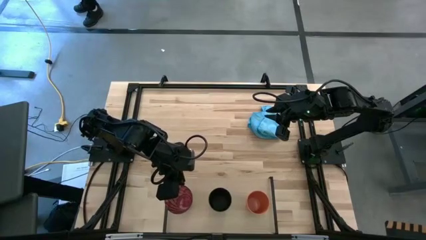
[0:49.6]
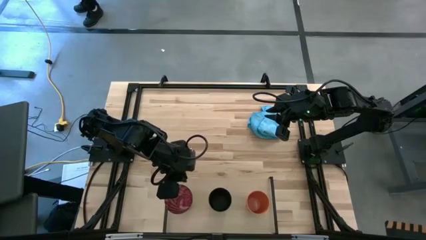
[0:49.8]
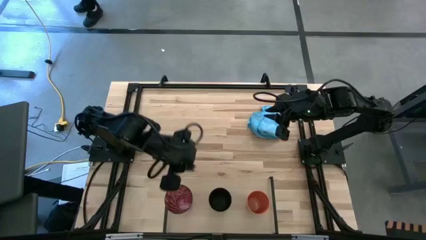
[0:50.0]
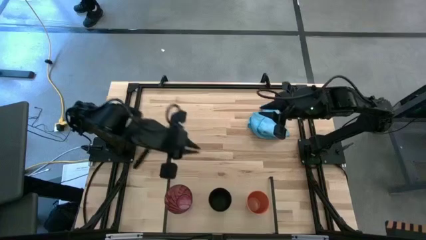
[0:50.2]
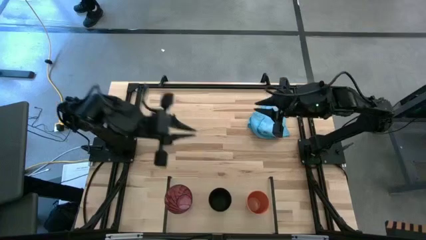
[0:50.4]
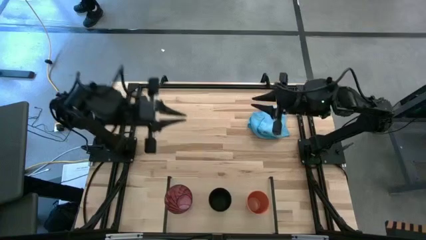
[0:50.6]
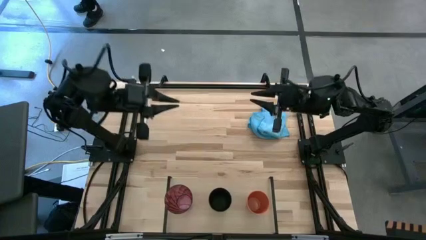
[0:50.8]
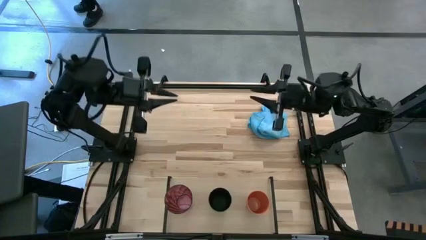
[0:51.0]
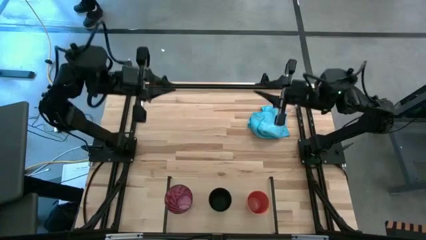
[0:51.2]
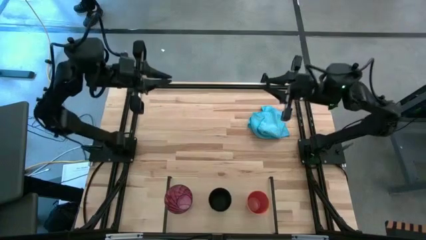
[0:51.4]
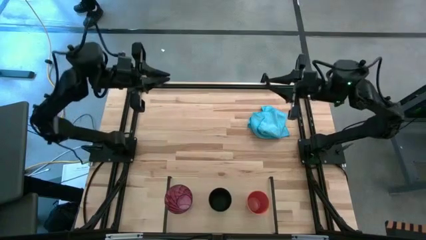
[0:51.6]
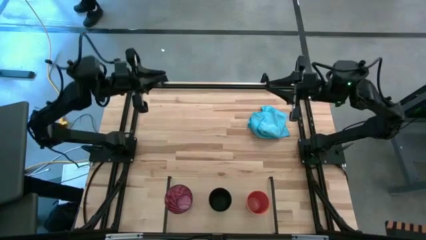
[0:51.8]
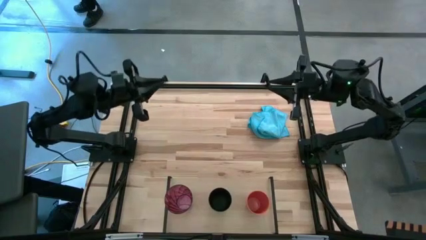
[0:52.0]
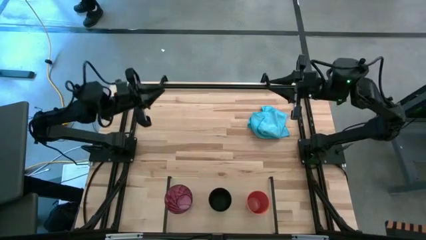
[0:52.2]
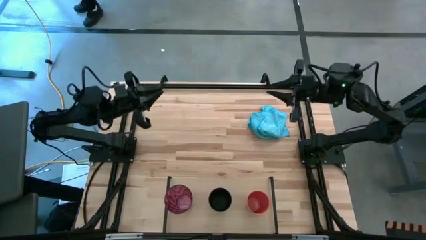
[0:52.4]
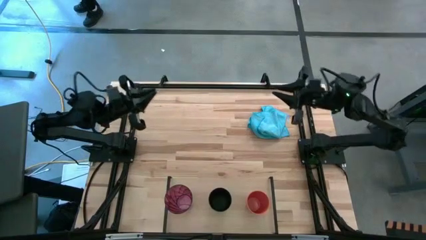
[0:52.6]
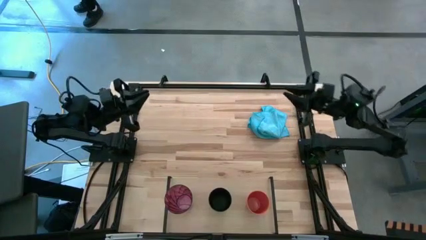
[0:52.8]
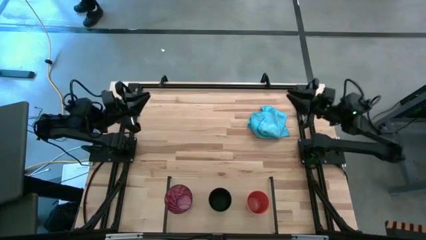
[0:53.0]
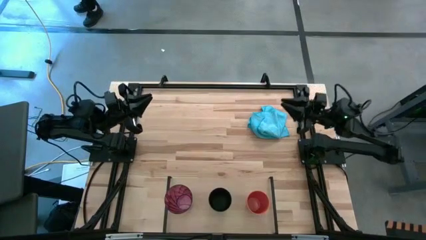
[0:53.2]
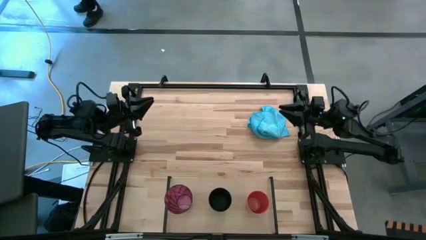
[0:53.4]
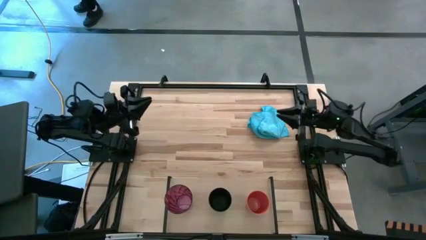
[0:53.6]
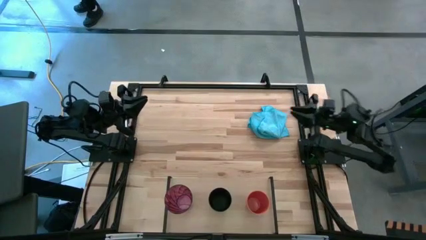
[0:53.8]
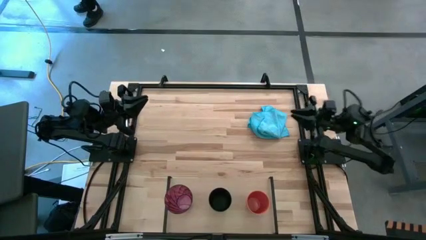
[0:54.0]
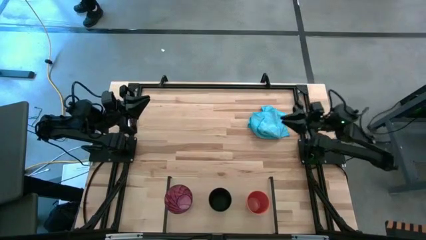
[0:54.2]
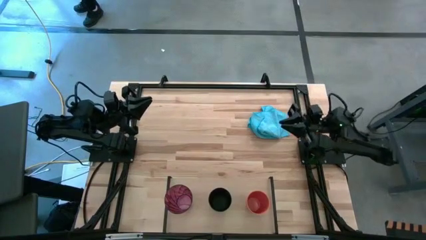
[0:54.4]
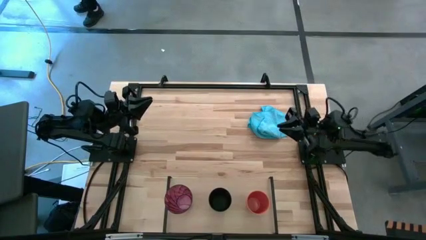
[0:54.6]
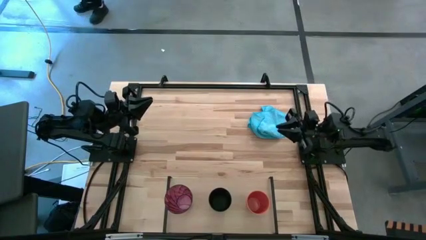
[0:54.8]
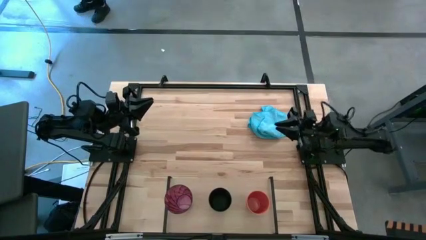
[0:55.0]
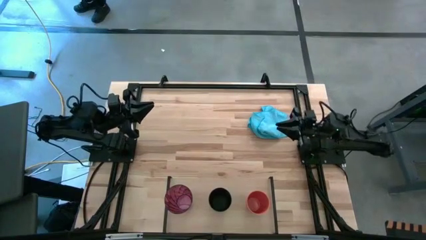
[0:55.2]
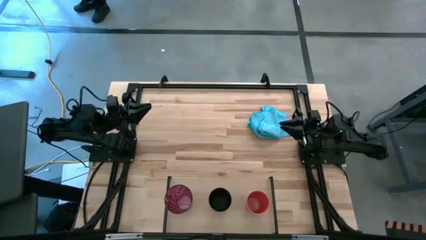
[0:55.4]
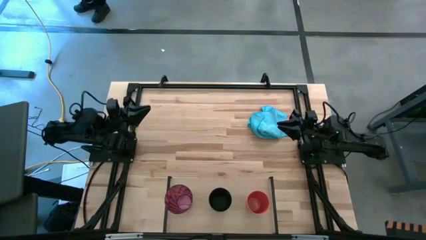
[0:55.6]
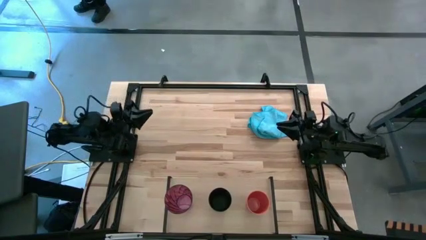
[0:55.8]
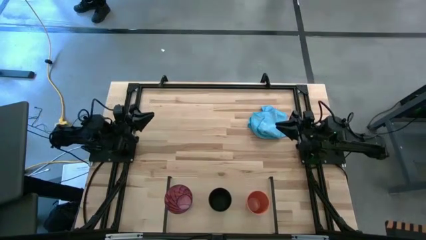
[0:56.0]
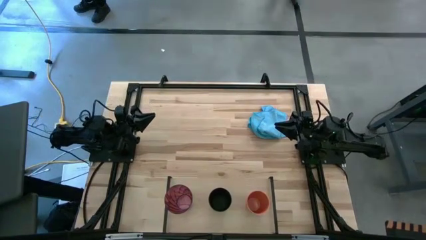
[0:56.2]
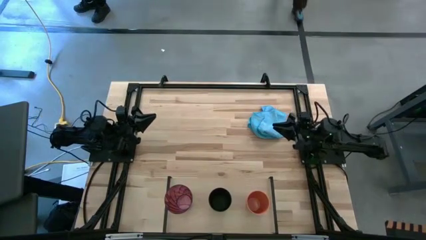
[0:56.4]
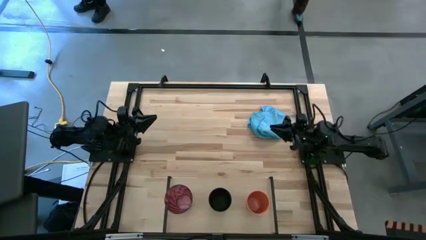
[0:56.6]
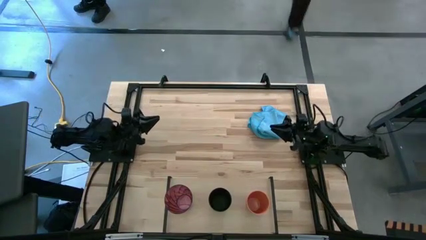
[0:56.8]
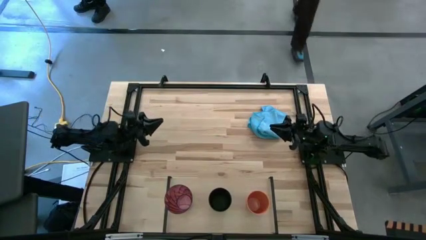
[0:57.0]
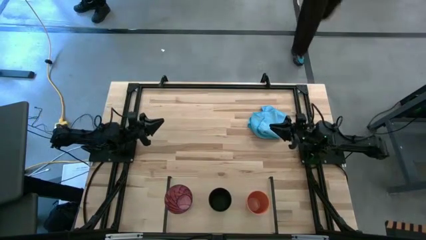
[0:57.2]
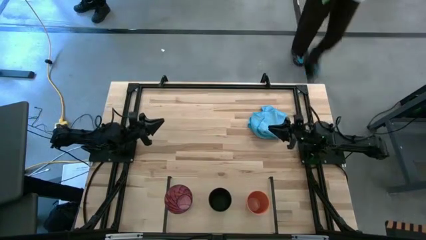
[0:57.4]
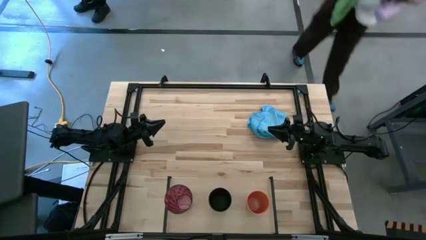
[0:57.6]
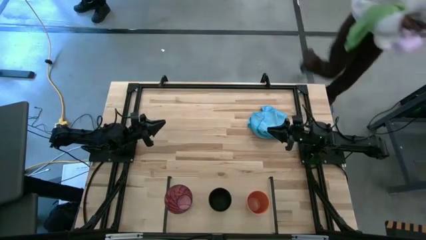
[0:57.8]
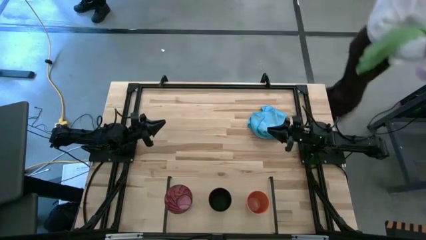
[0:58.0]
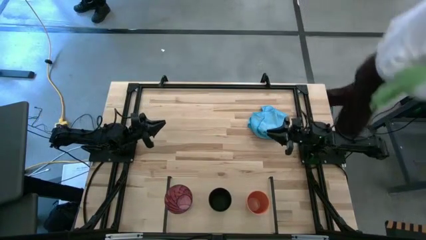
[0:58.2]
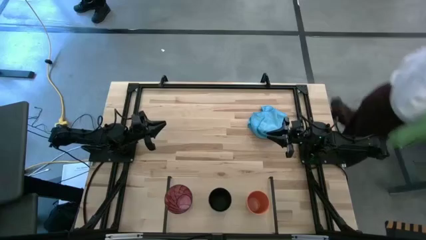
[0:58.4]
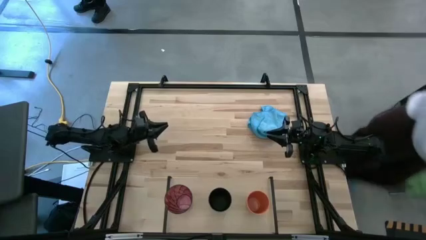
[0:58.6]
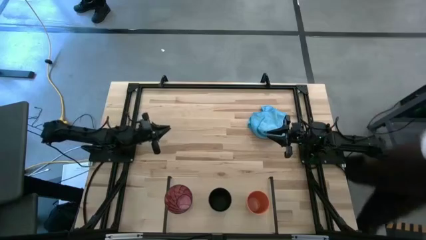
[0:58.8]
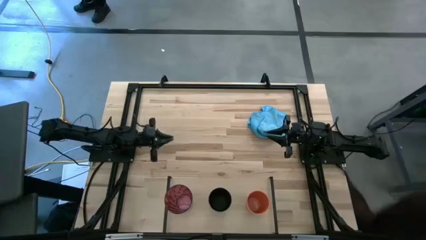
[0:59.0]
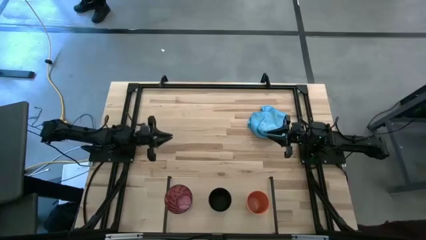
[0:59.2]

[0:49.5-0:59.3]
Task: Stack small to large cups/mugs on shelf
Return to Home Position

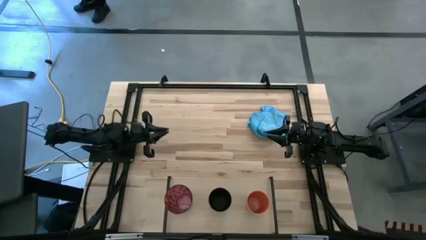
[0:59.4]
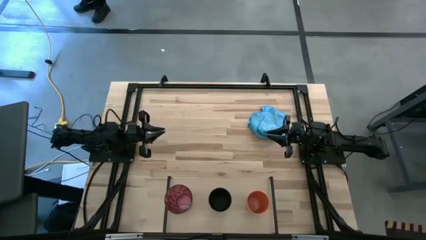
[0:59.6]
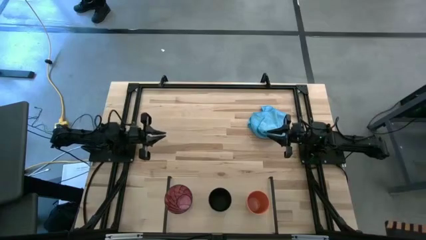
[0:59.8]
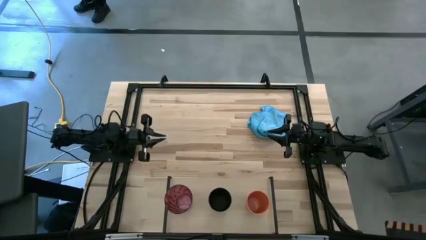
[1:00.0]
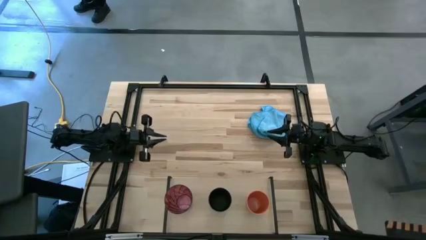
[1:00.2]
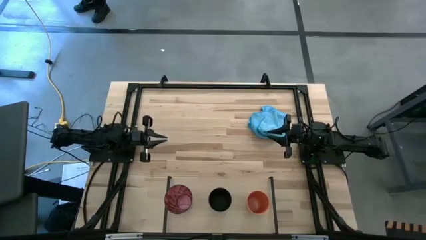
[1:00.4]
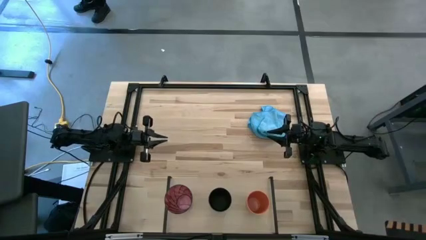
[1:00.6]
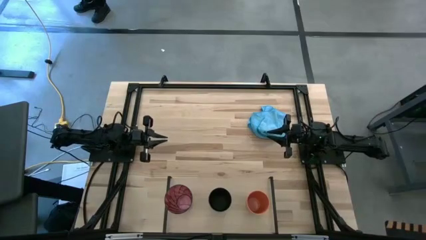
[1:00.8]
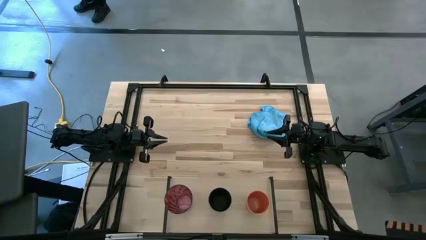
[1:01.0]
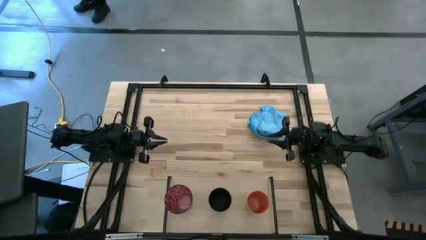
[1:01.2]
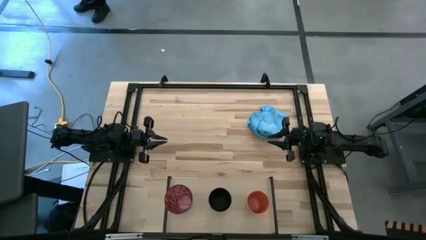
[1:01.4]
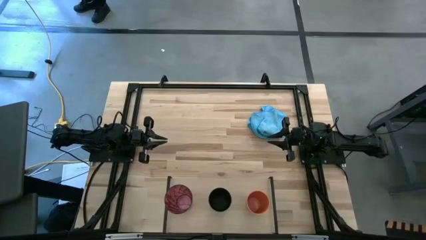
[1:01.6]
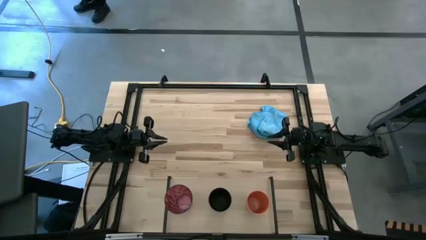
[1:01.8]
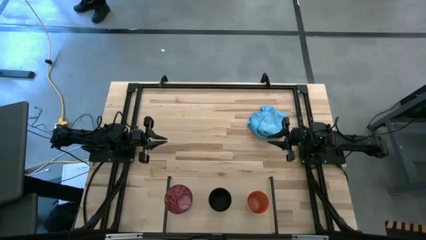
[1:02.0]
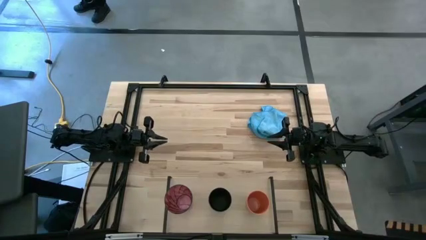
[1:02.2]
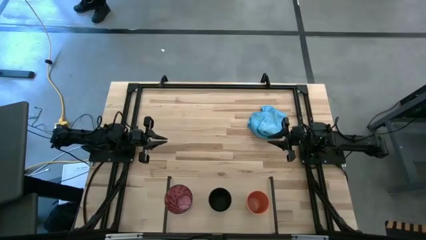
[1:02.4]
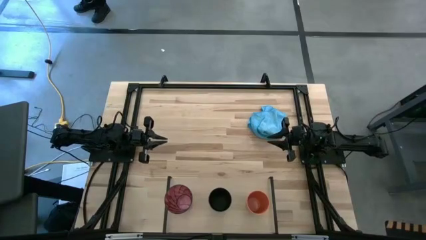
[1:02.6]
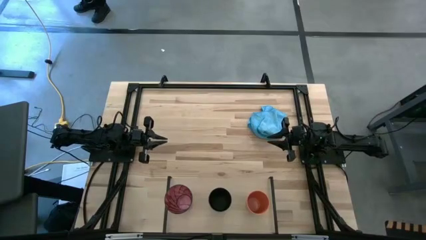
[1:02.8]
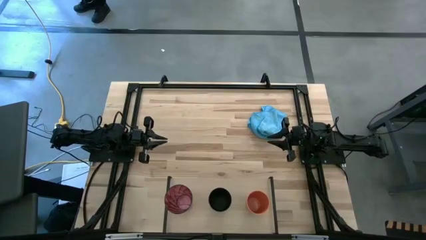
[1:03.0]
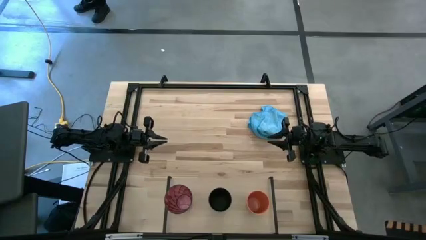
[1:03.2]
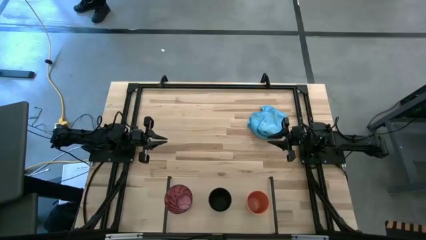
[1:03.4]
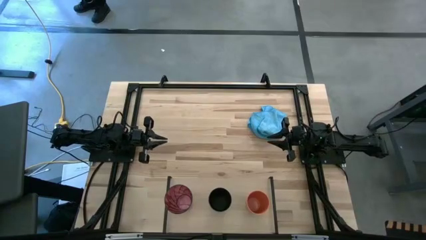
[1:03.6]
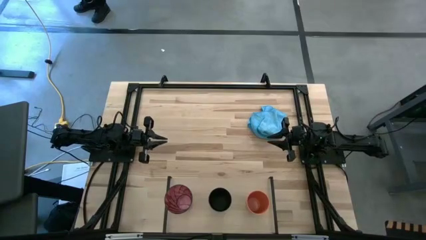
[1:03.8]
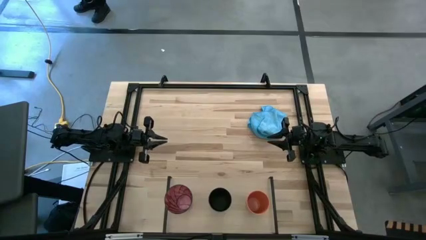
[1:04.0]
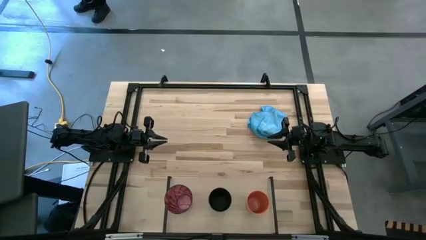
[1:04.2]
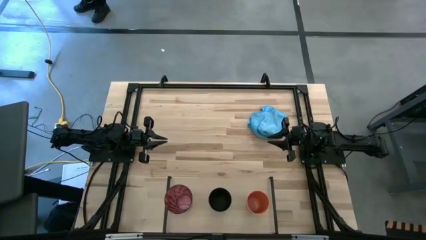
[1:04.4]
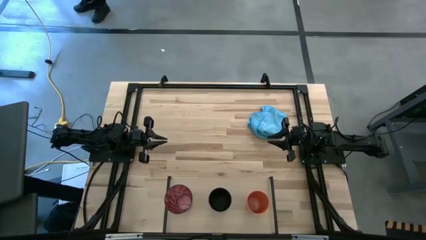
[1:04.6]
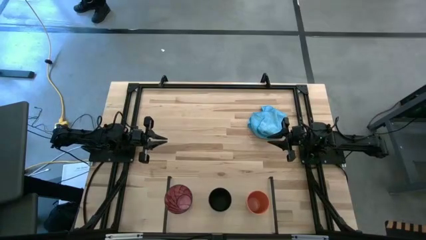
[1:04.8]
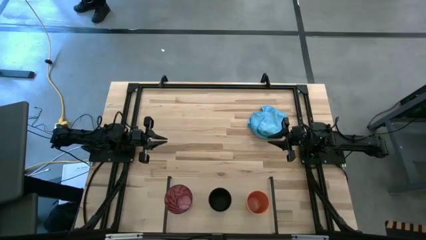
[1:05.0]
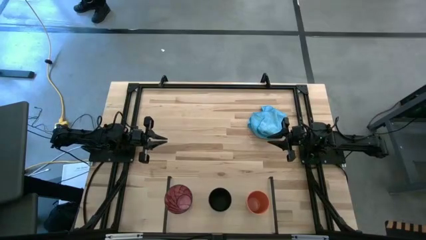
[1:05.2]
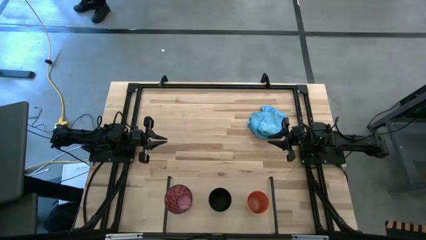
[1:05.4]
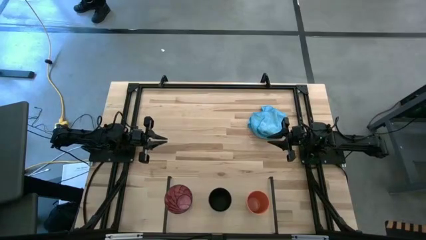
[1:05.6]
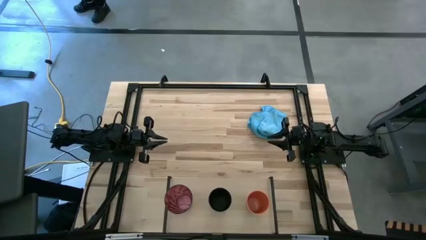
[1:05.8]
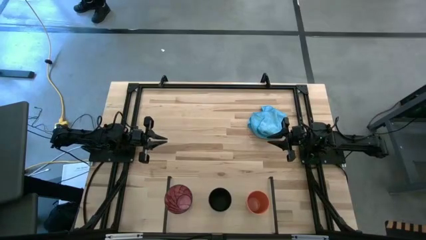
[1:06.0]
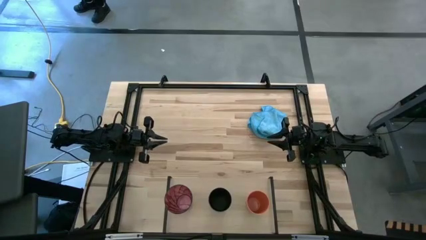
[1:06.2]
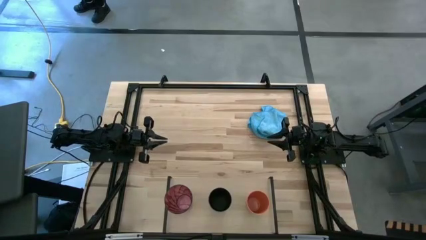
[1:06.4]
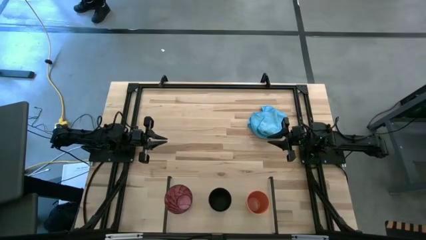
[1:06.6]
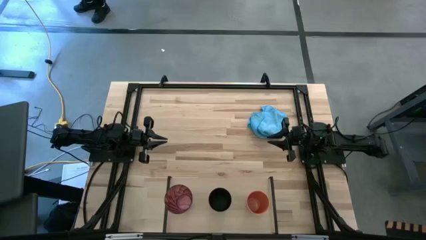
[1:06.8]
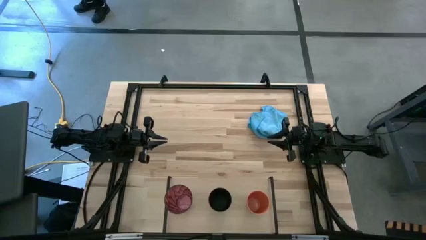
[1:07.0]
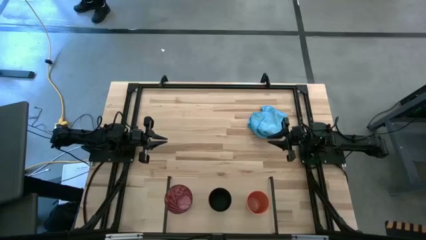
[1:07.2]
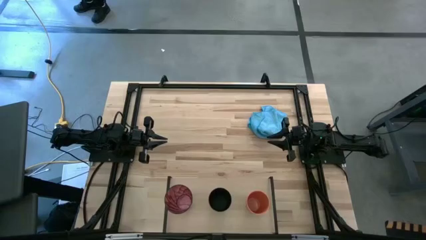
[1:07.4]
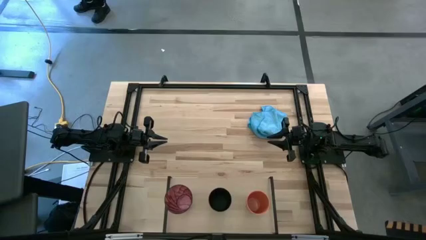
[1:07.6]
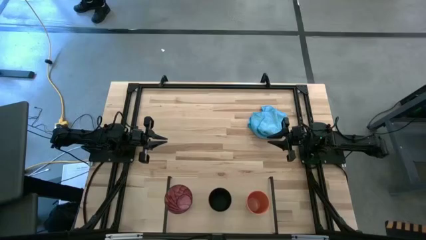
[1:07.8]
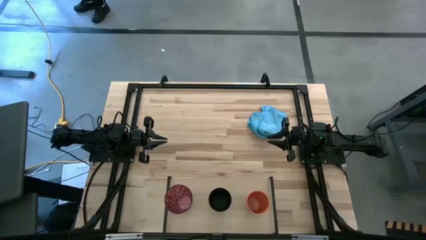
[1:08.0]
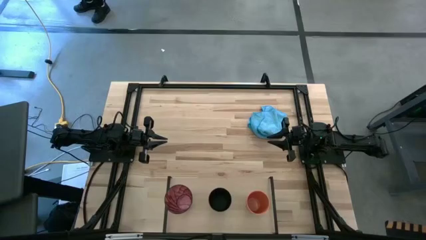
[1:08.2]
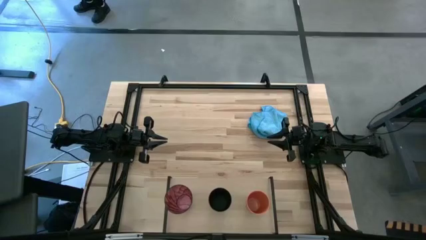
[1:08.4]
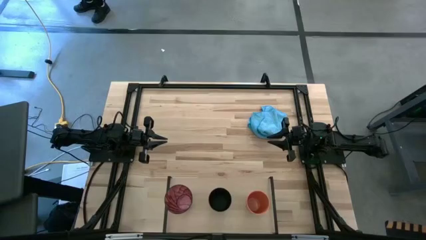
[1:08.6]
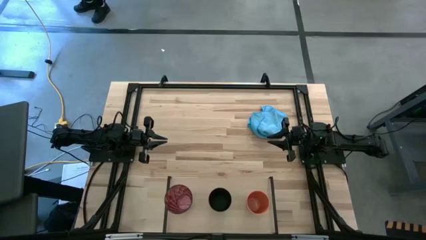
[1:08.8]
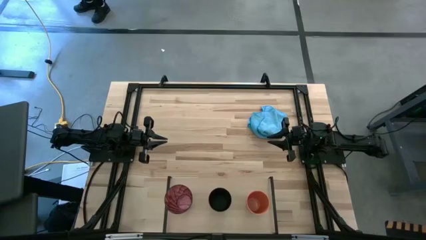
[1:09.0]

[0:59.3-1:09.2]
Return to Home Position
